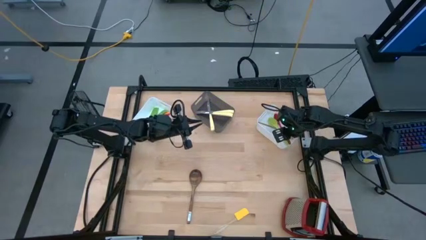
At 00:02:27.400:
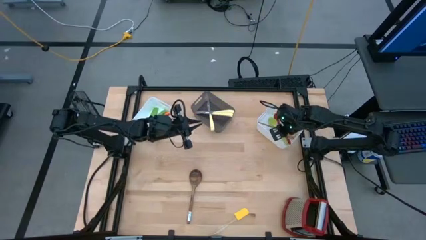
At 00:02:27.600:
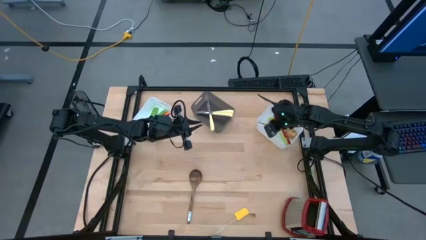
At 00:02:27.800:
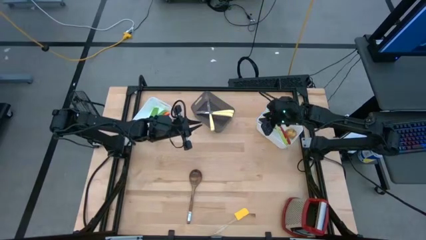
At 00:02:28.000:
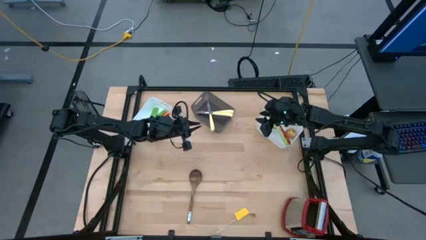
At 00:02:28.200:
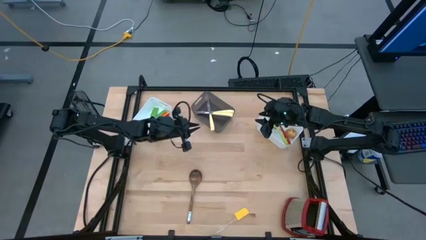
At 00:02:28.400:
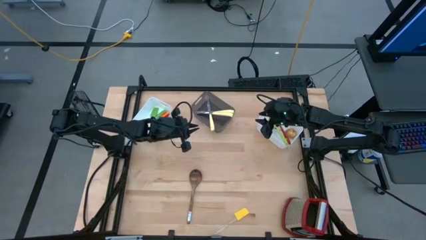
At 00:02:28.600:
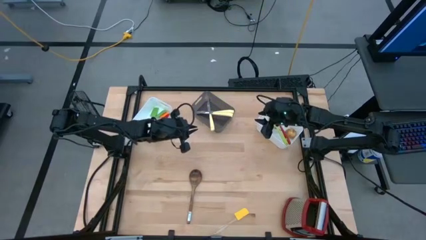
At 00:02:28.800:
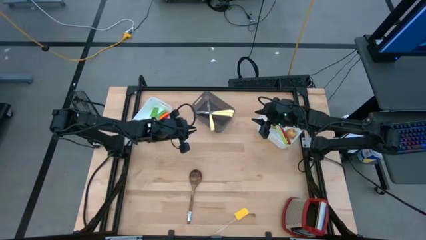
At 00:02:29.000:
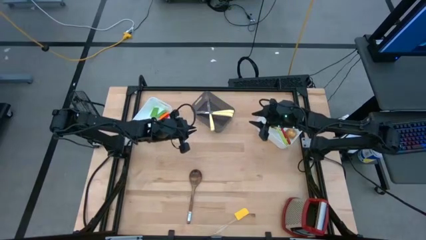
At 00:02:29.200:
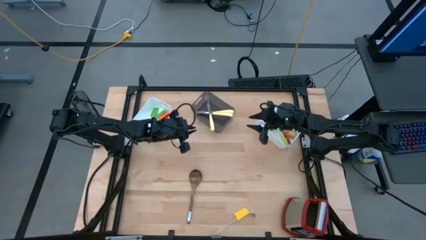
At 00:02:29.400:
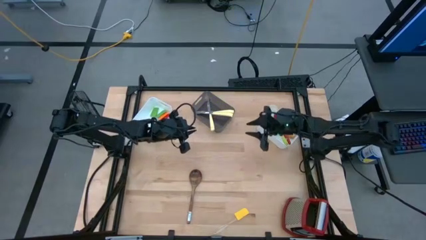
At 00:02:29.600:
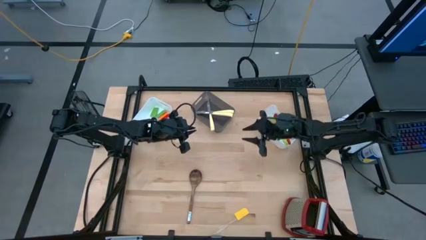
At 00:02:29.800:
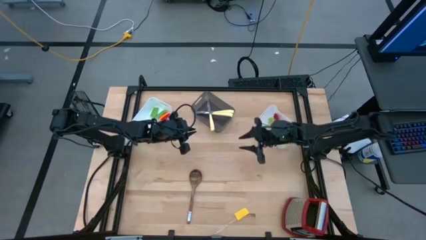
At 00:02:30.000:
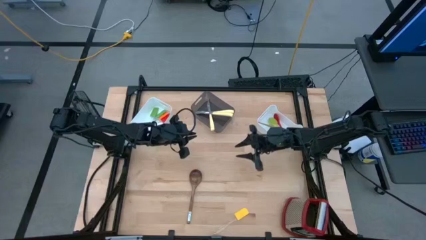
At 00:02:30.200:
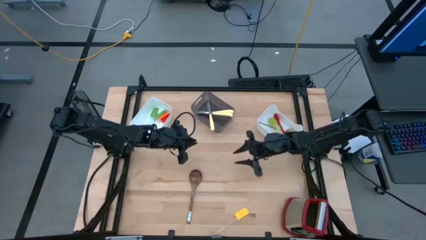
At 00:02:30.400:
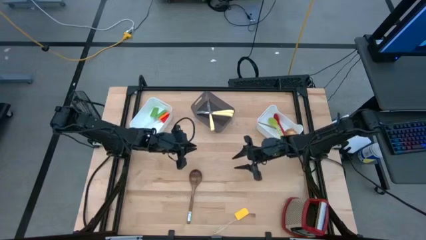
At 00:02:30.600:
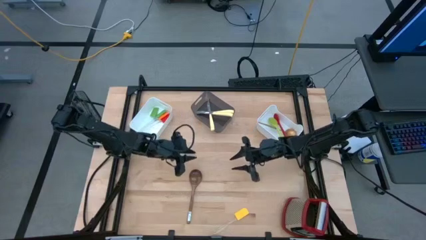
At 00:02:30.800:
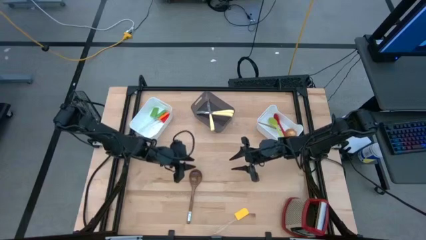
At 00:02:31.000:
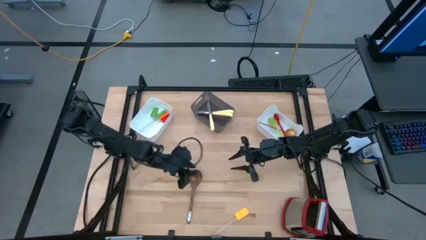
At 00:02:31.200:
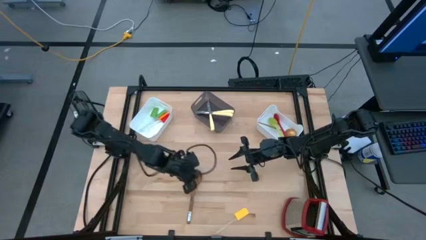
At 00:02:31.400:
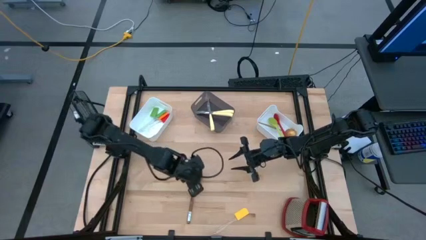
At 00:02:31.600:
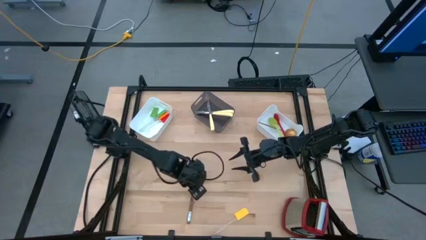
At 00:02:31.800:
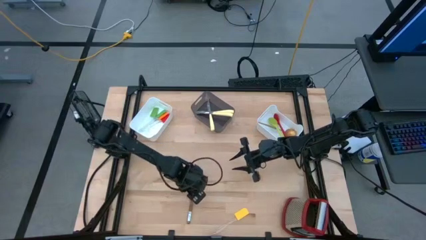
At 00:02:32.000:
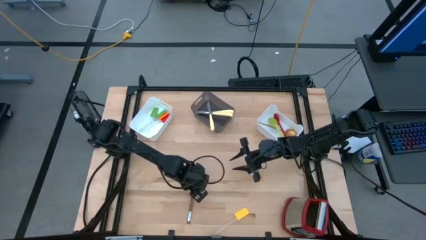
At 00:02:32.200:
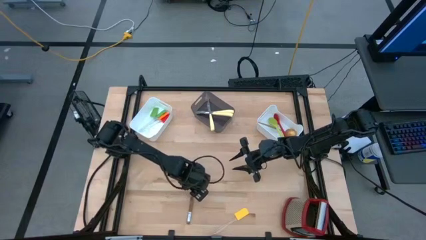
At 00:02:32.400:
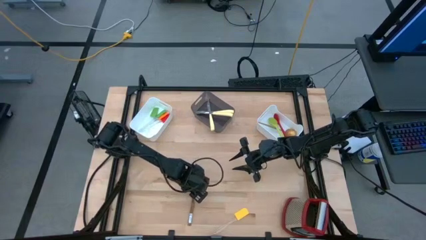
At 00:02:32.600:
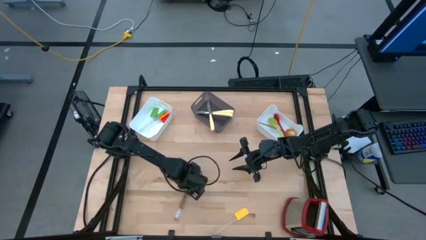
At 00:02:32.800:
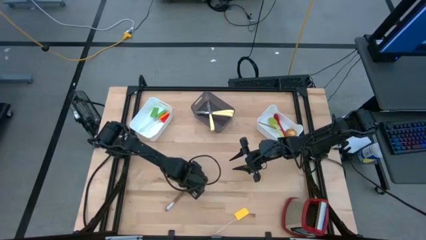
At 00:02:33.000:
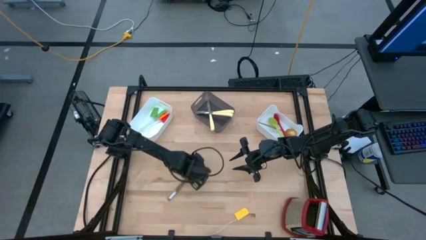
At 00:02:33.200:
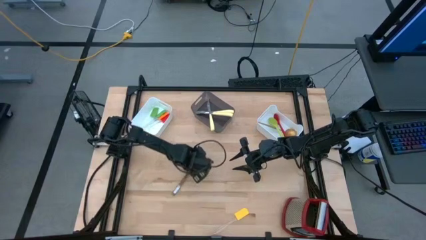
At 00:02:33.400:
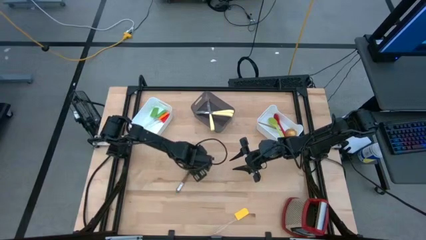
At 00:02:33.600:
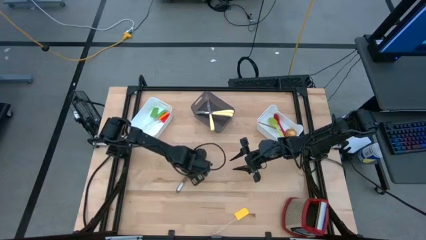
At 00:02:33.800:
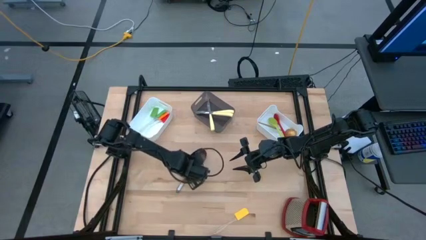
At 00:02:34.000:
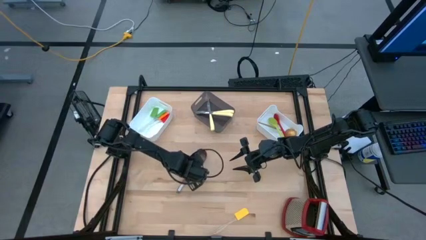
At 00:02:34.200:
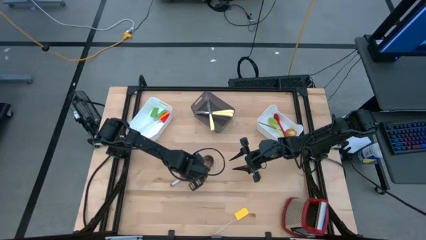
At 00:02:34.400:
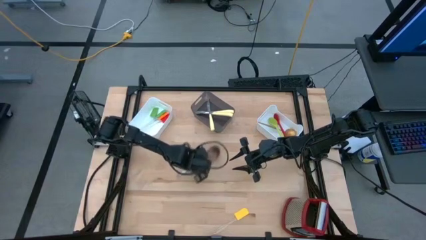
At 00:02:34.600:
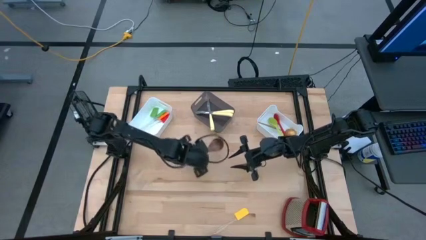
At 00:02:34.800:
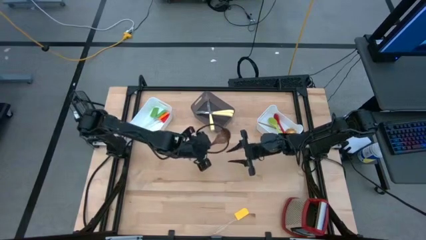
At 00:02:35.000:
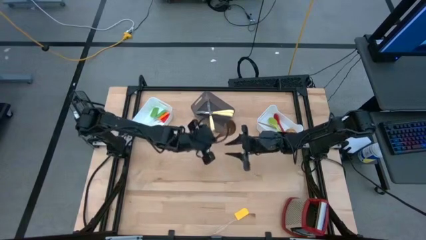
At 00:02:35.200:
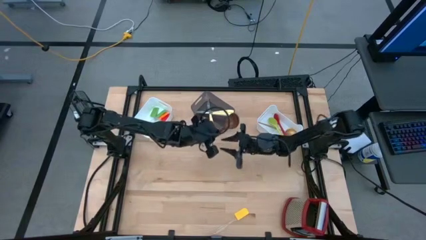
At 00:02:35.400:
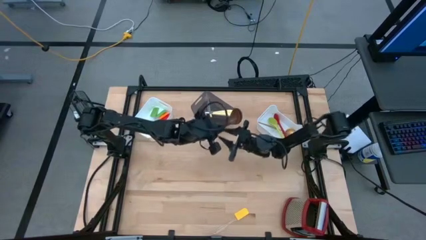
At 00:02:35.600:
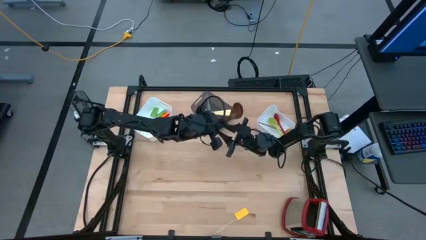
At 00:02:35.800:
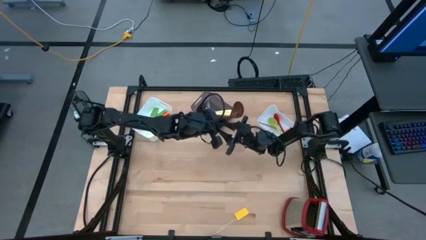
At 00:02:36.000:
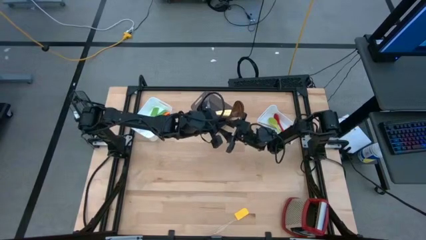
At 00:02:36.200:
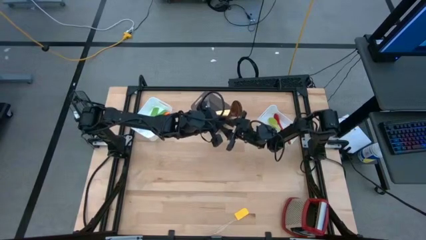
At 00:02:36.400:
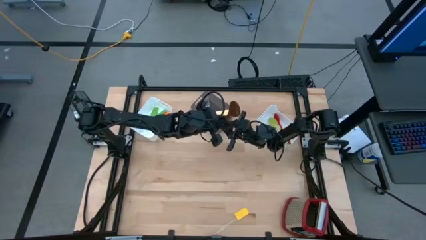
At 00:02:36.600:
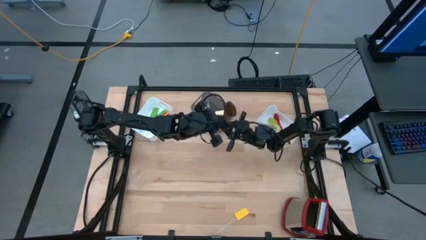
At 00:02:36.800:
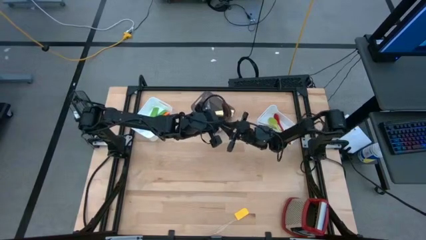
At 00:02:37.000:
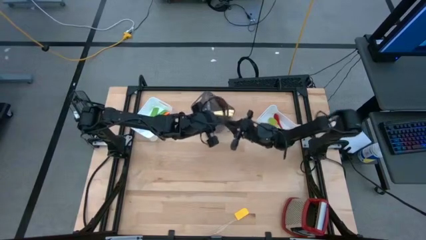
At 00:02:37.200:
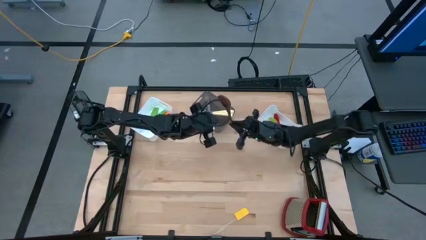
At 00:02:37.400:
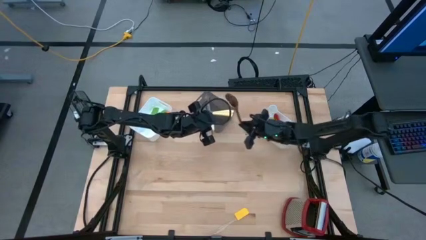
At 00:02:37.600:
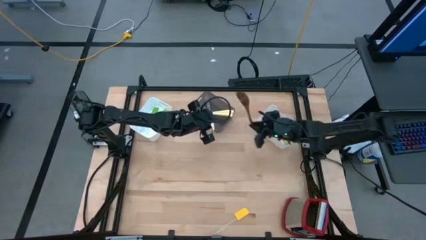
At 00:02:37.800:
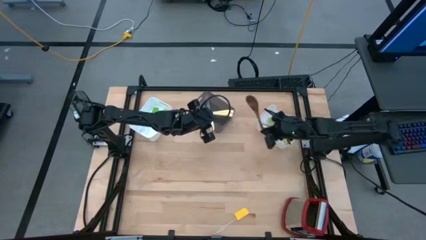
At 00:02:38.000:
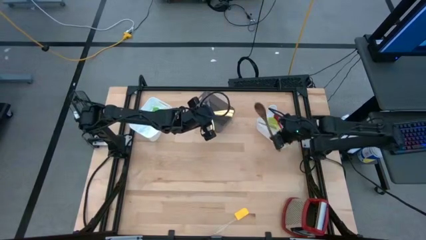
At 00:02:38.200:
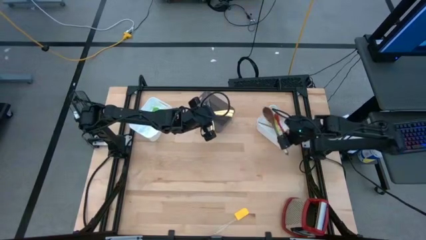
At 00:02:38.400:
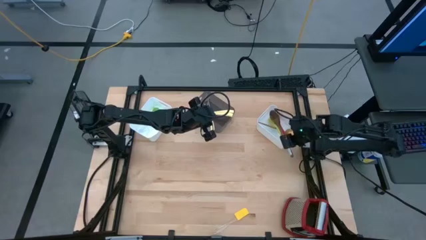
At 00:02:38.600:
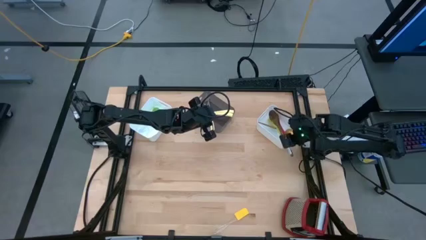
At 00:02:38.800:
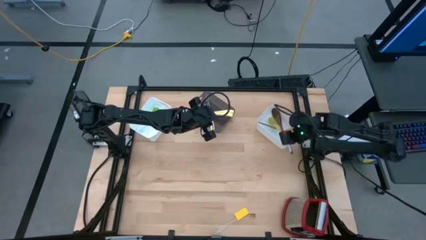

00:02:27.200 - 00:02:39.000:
Task: Pick & Place Kitchen Items
Put the brown serving spoon into the right white bin

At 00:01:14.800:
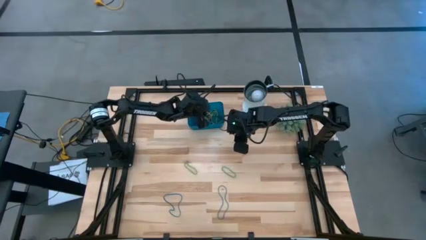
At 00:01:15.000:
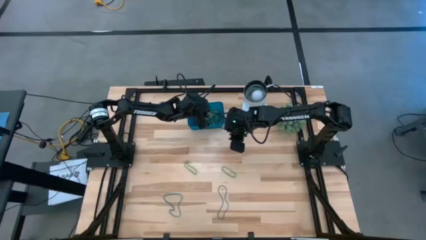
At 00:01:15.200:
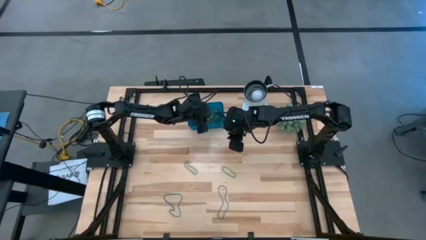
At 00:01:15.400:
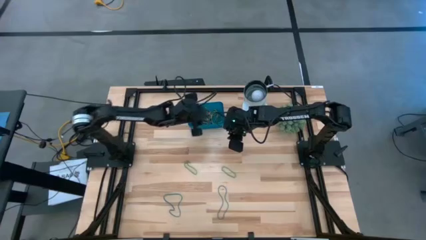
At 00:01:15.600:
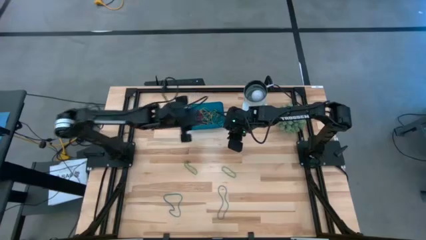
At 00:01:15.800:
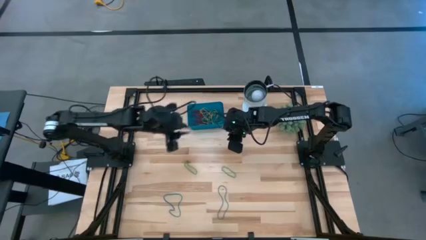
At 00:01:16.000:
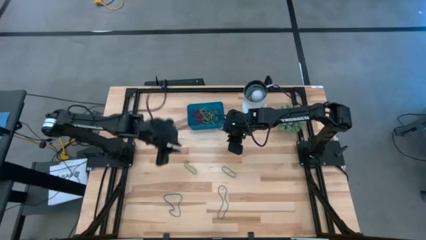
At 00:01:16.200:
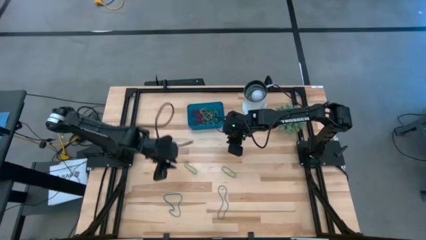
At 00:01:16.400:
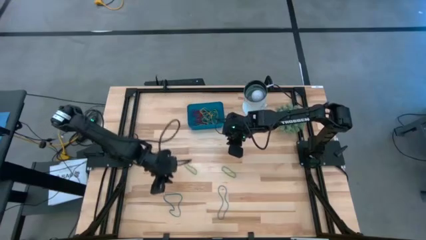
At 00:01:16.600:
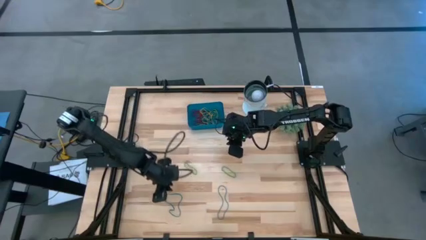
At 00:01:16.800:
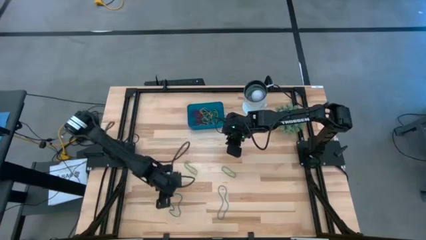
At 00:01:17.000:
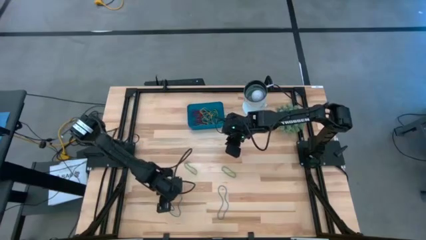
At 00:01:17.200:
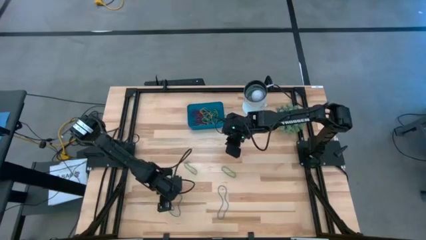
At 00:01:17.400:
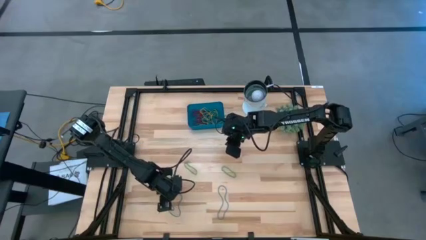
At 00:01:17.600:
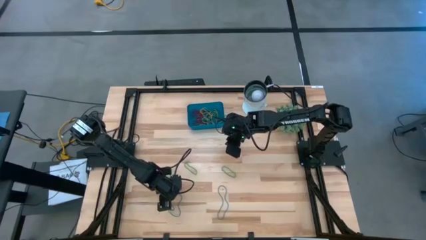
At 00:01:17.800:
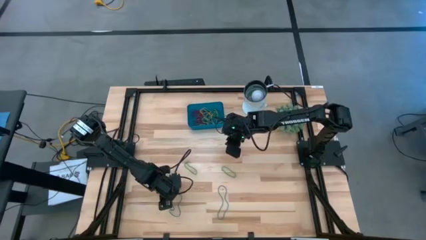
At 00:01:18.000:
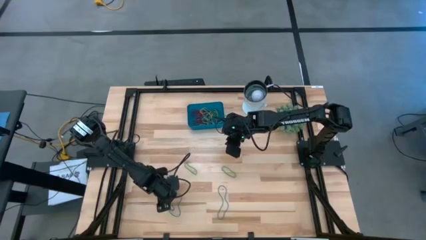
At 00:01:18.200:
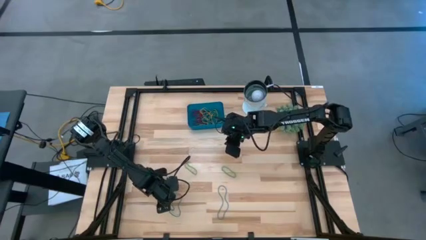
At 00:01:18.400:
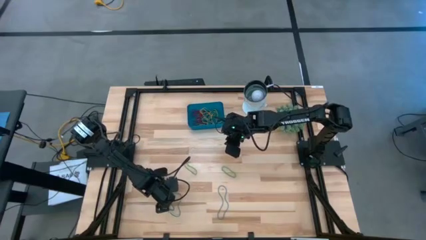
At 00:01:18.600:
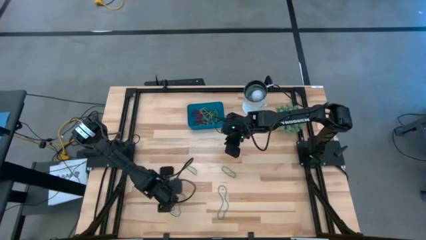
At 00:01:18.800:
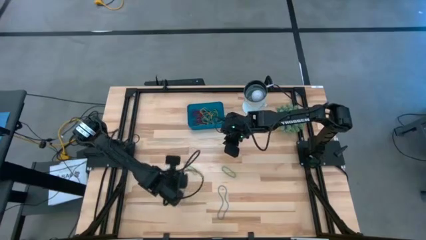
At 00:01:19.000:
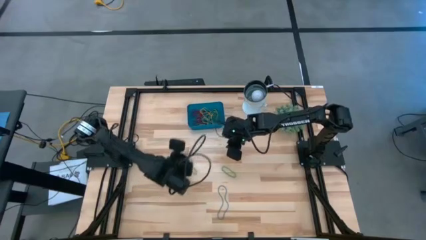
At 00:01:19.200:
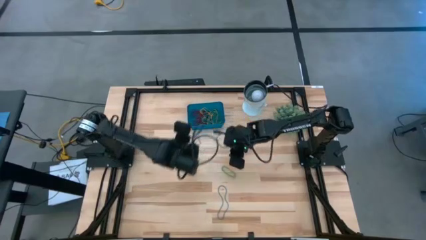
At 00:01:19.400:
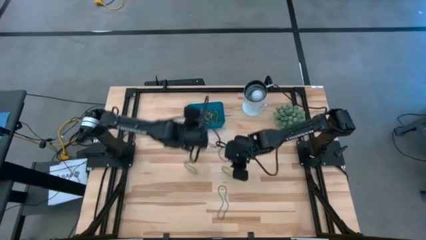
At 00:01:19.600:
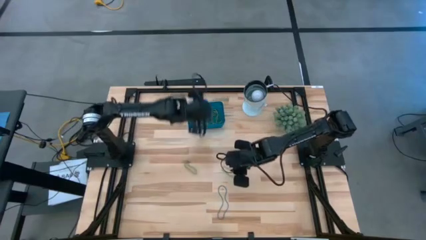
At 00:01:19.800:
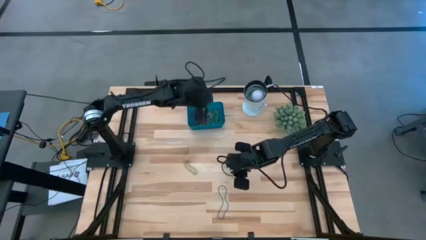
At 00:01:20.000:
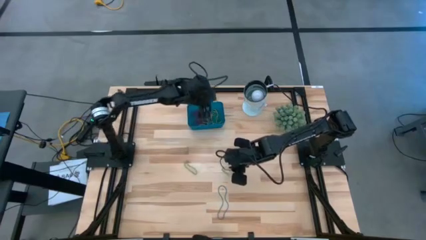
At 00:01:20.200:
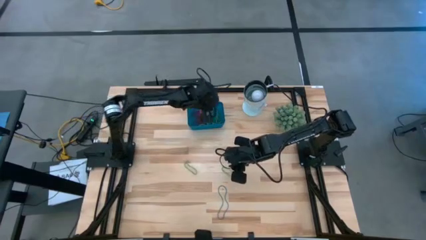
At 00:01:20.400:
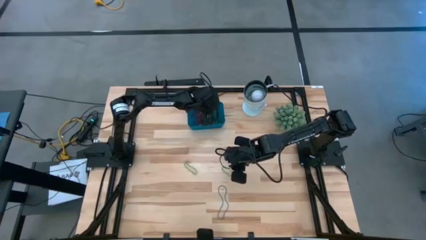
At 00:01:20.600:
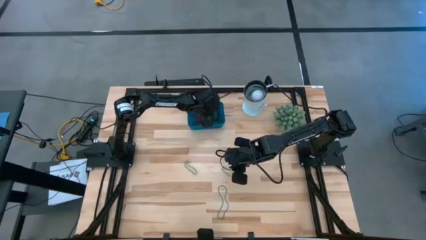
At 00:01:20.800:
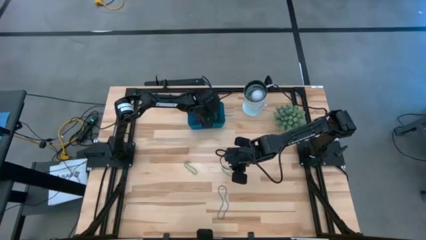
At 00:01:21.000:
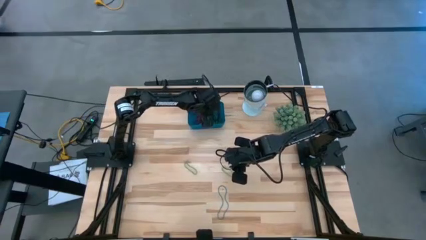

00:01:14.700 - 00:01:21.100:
Task: Pick and place items into bin
Put the blue rubber band into the blue bin
